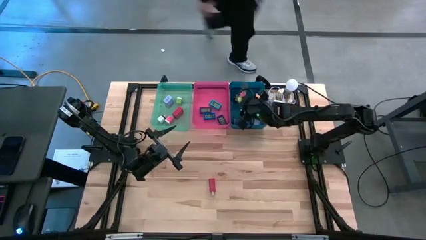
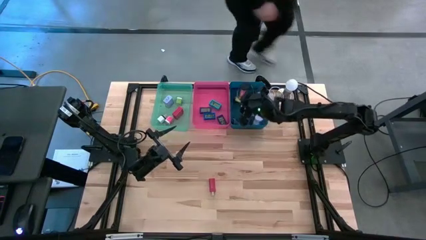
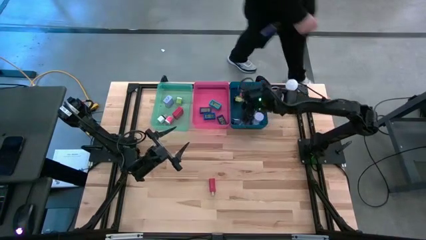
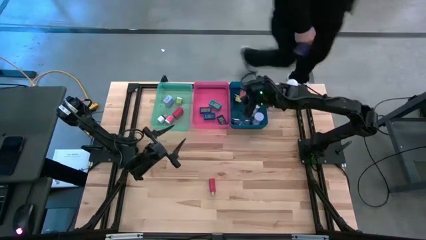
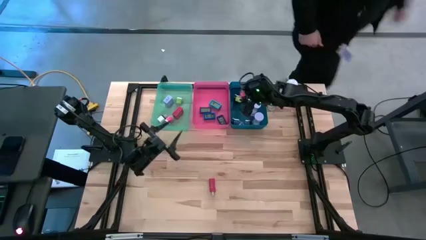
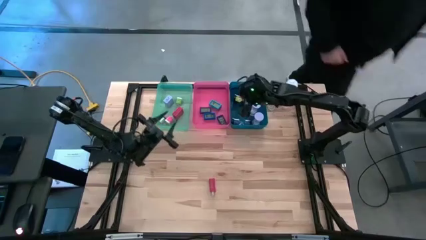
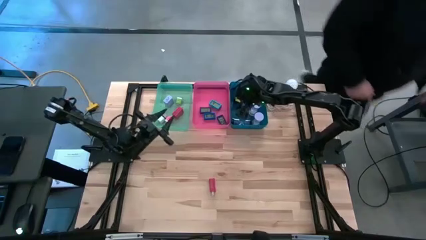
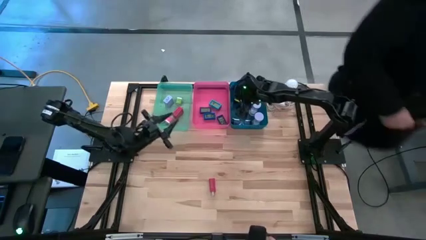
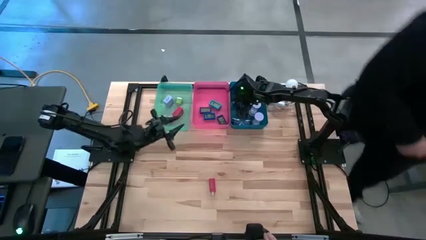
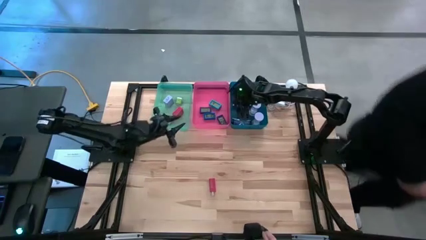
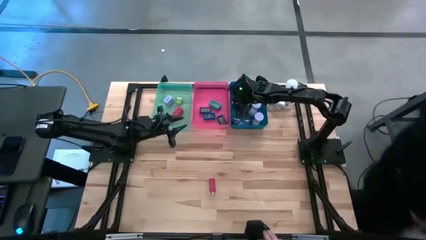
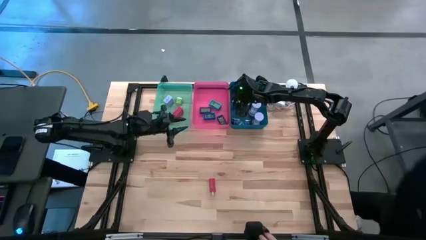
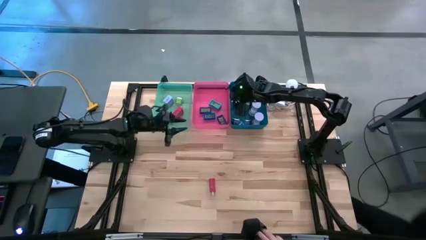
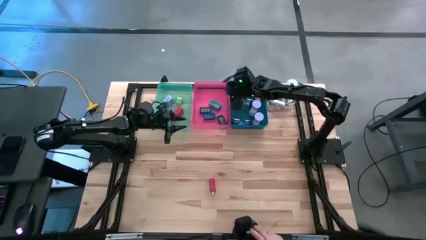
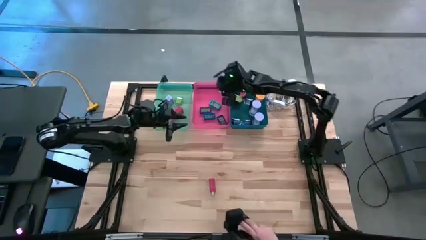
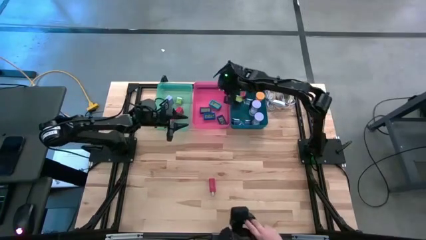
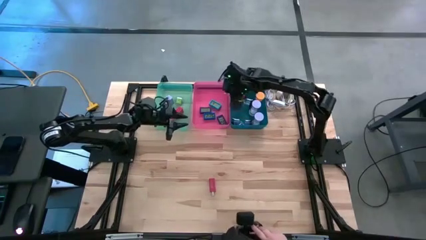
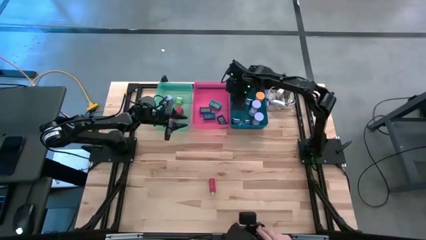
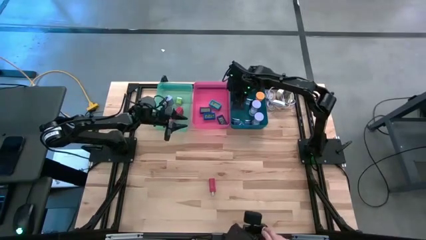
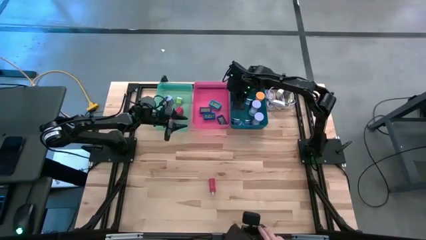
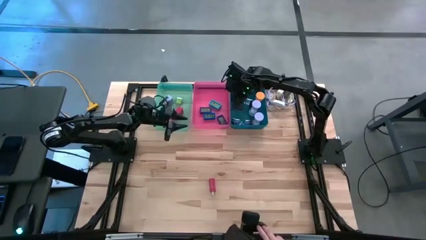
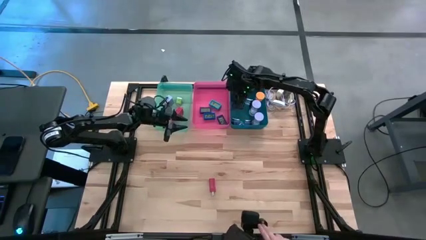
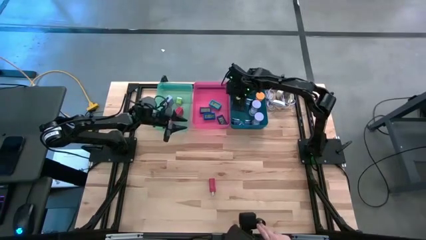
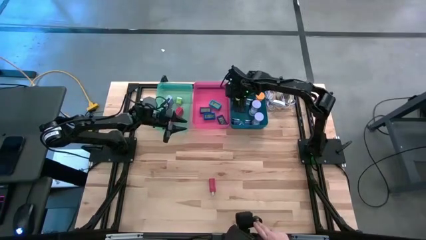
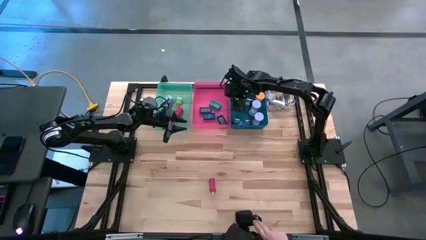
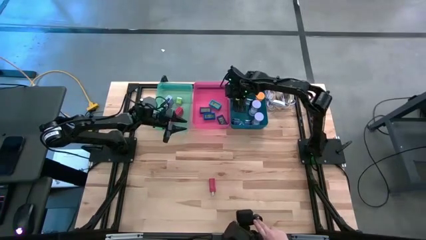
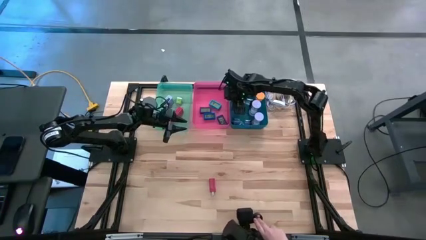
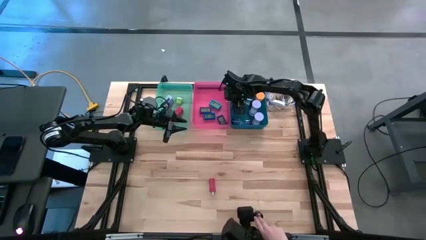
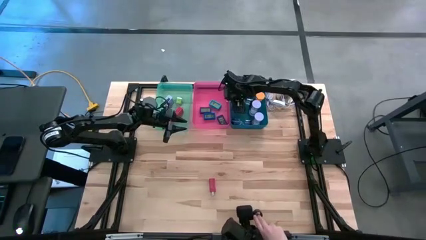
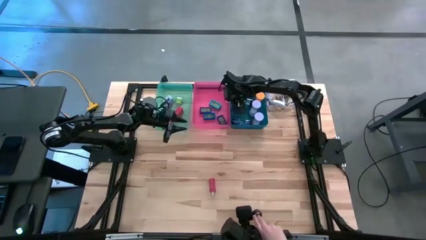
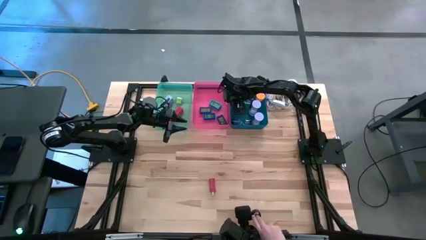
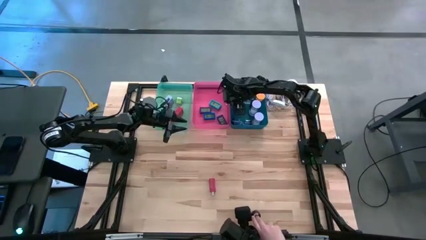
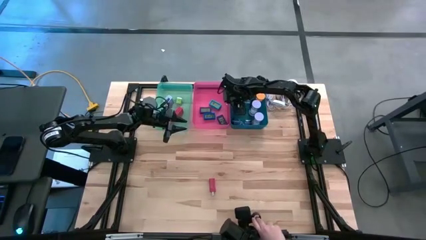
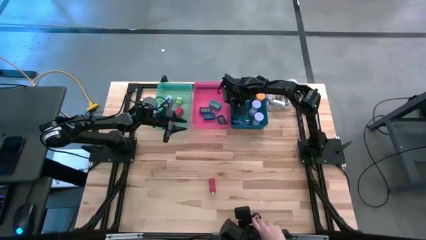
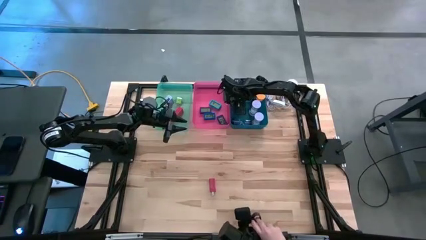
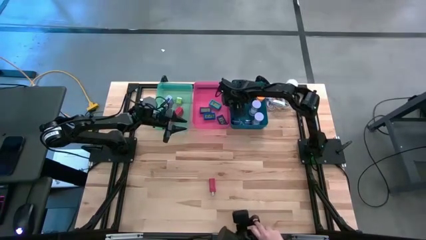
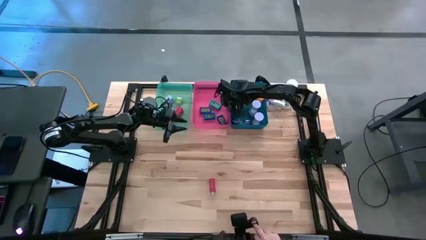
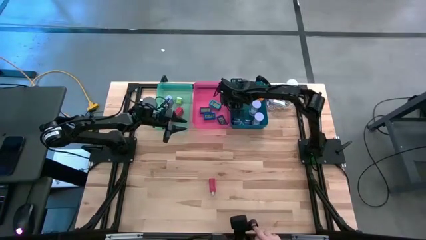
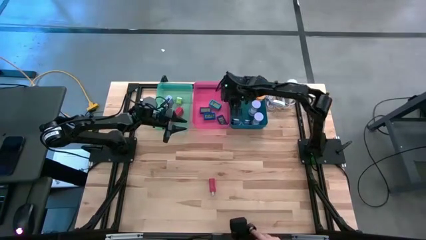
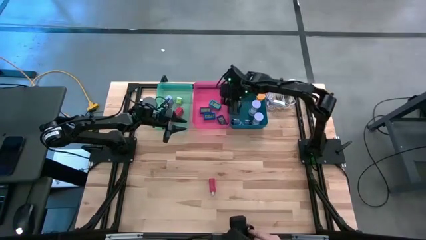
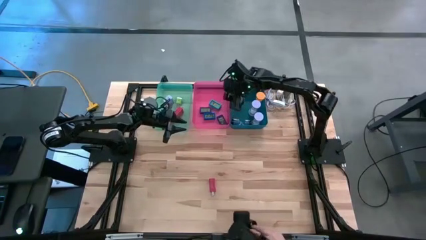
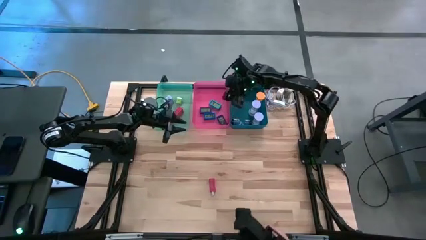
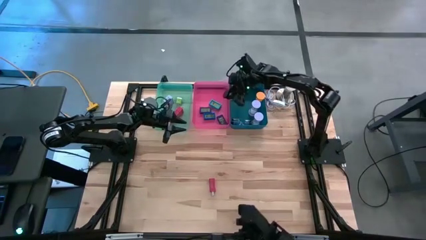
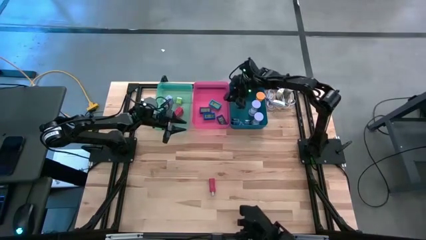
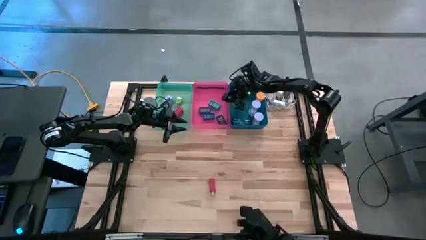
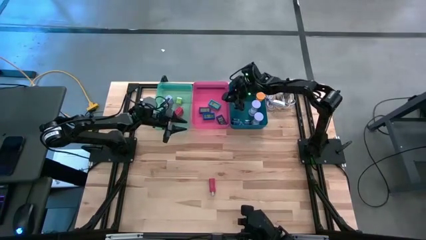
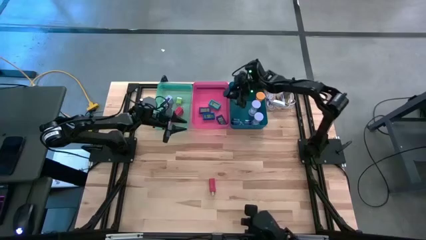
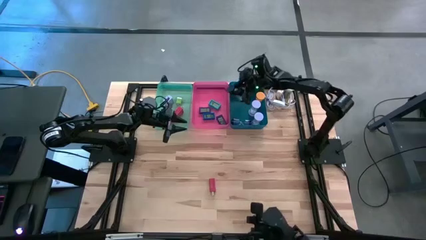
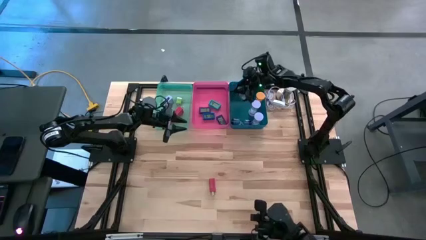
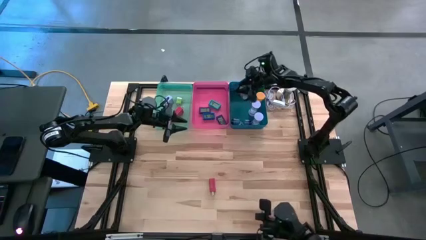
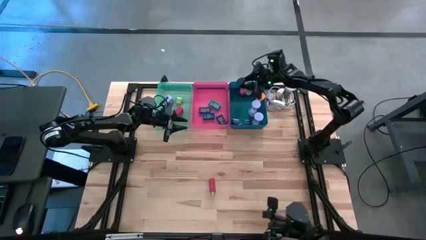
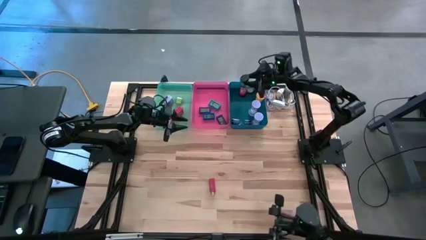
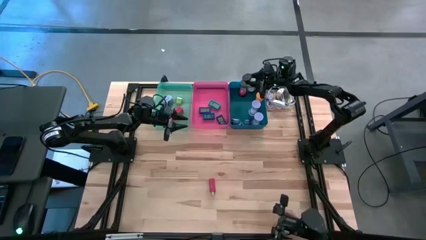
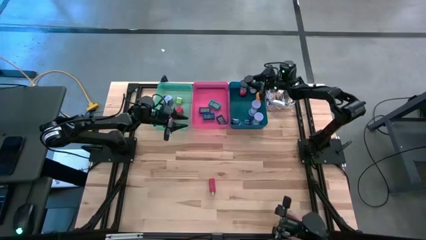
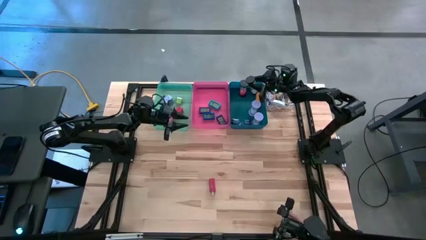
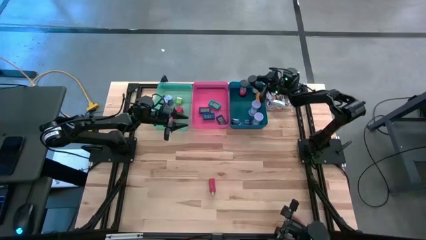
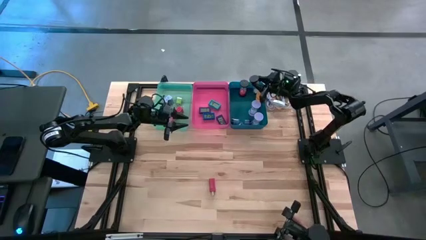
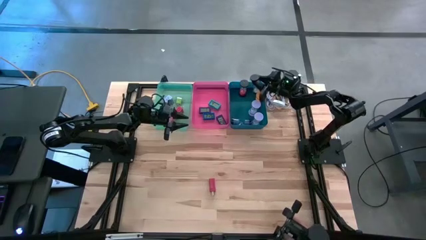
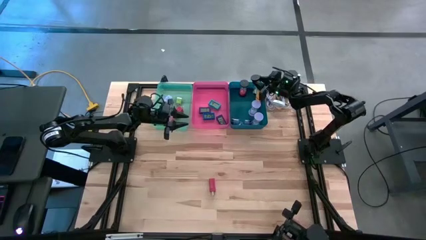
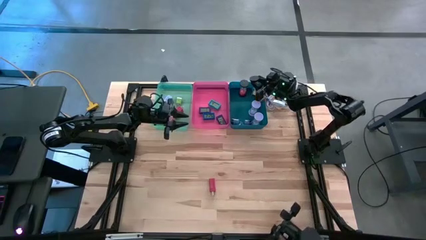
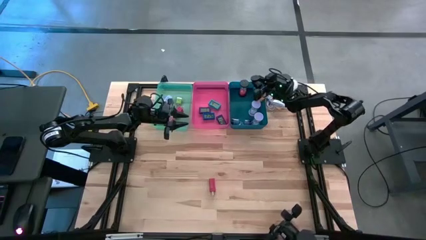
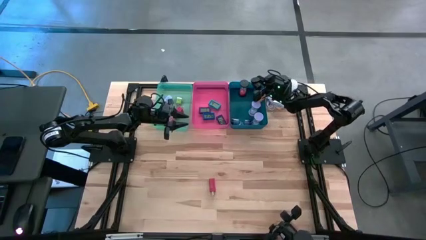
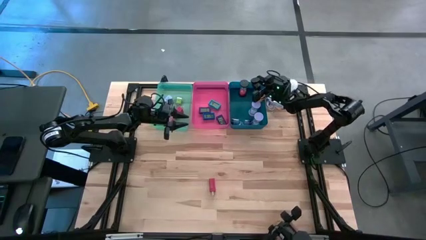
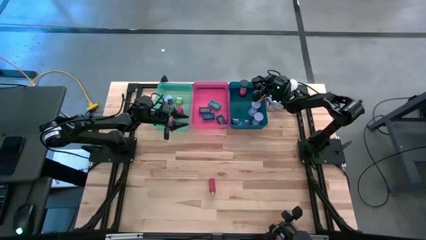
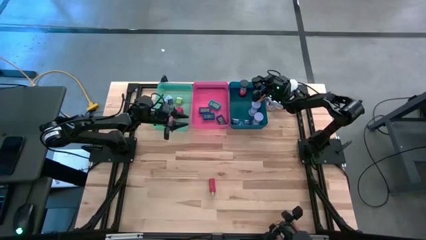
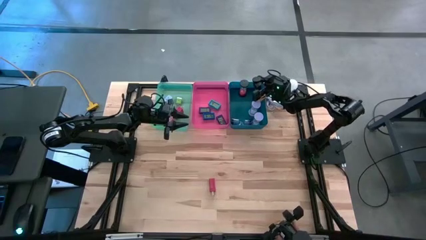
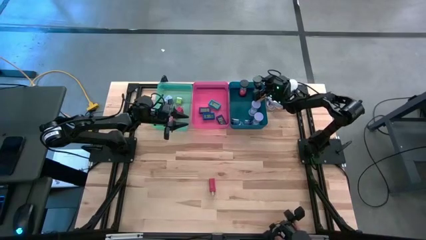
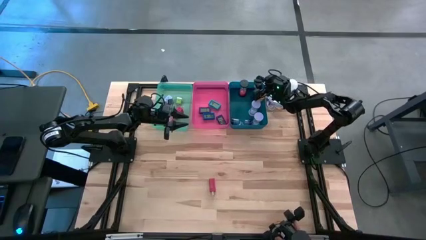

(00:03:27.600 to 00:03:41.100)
Task: Pick & Place Office items
Put the yellow black hourglass into the blue bin

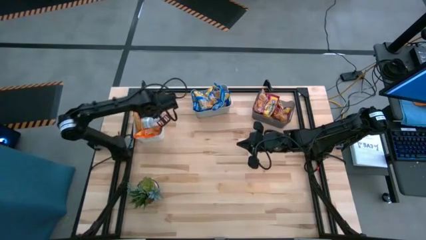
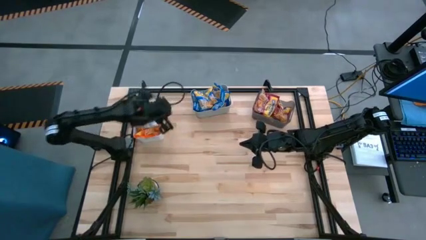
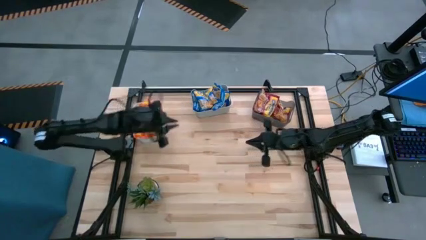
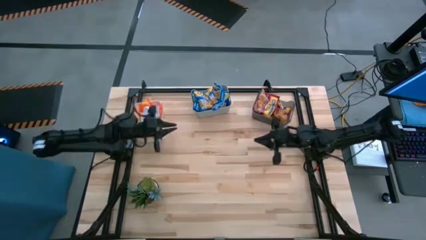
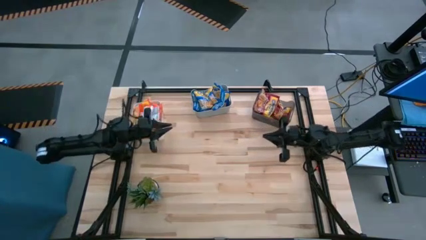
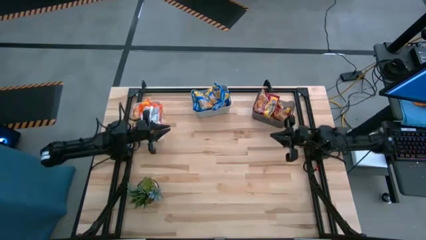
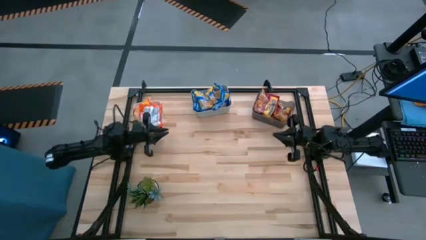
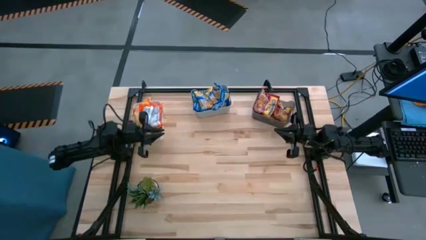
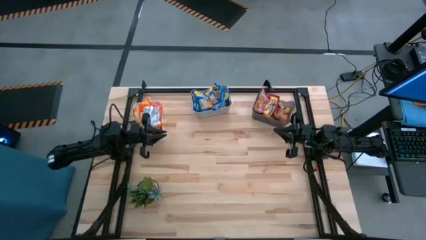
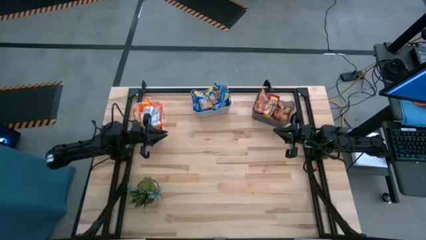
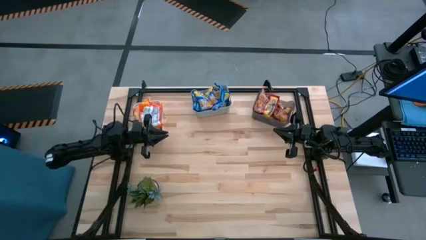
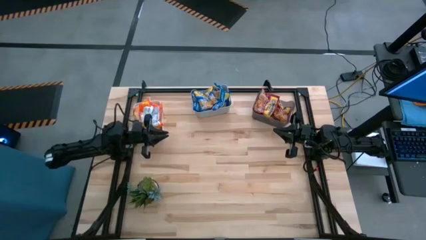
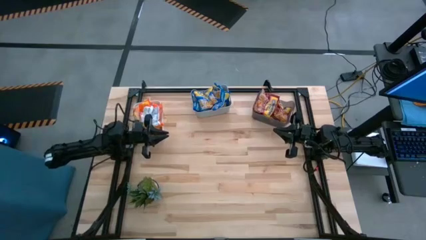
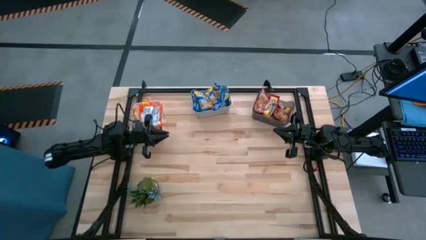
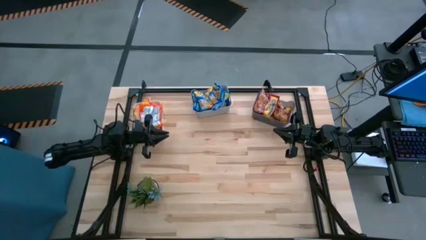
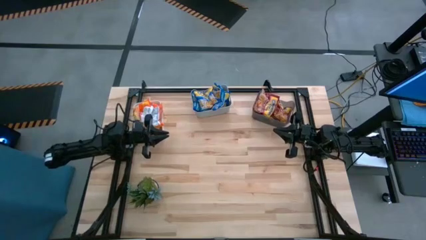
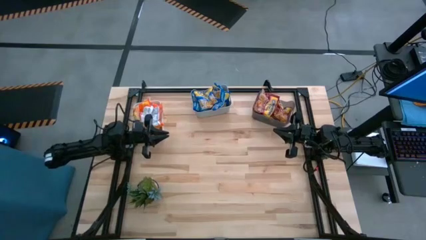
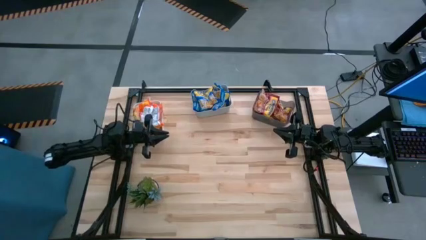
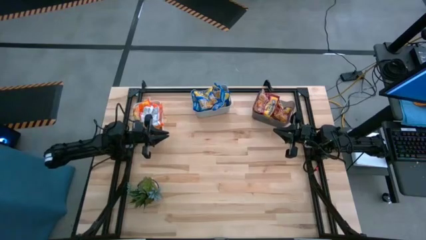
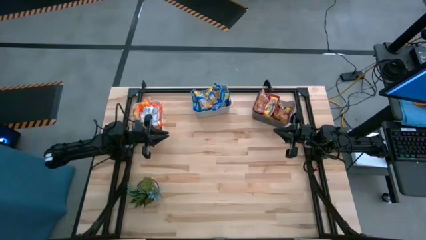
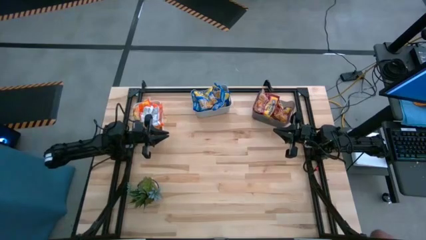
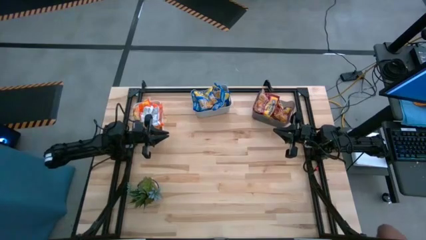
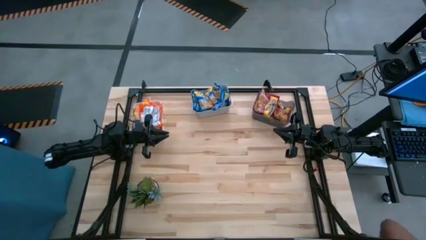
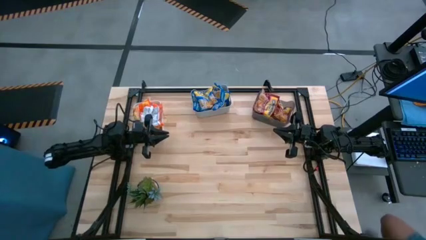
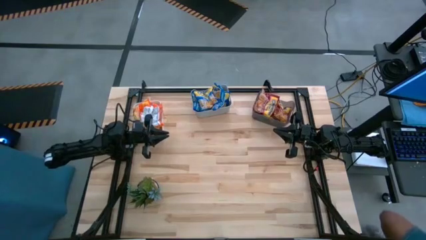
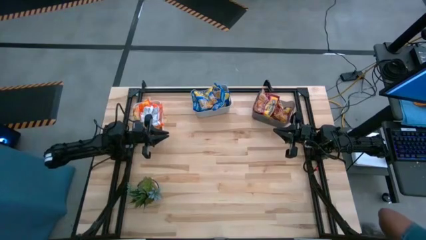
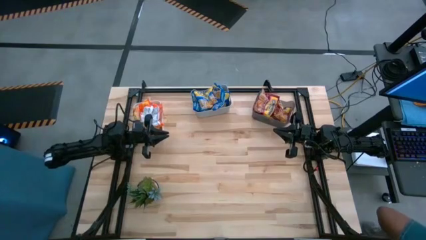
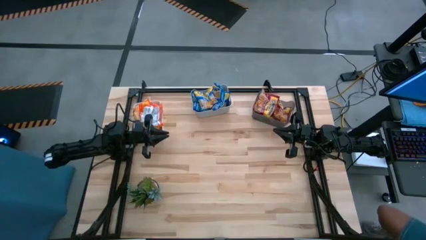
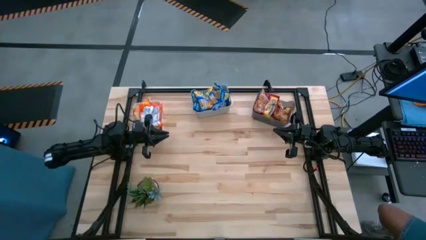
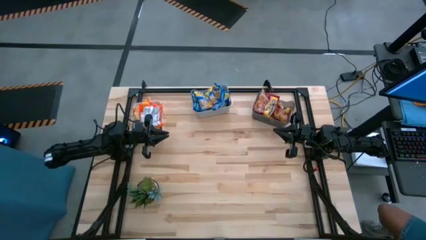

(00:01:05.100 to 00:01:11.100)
Task: Sort Maruchan noodles
Return to Home Position
